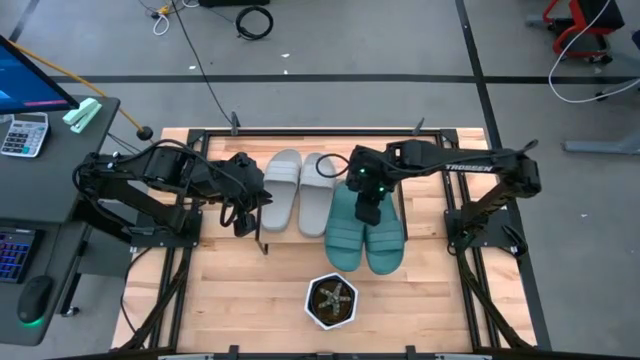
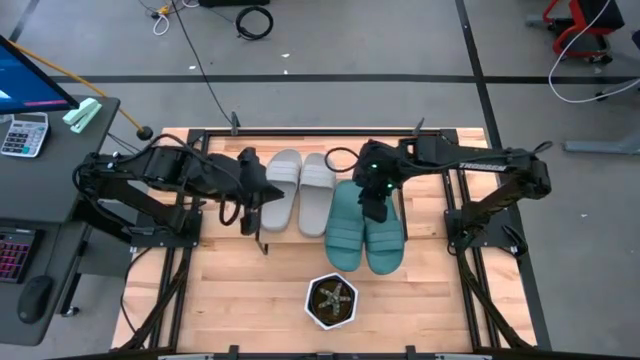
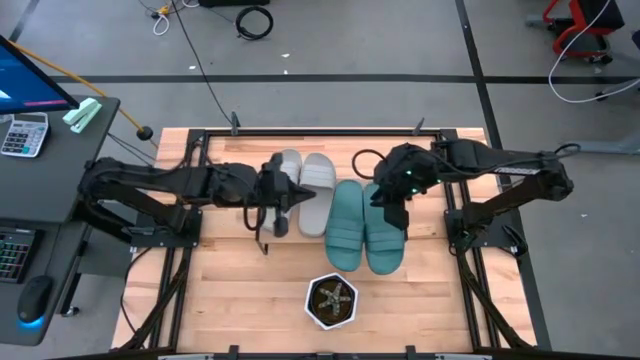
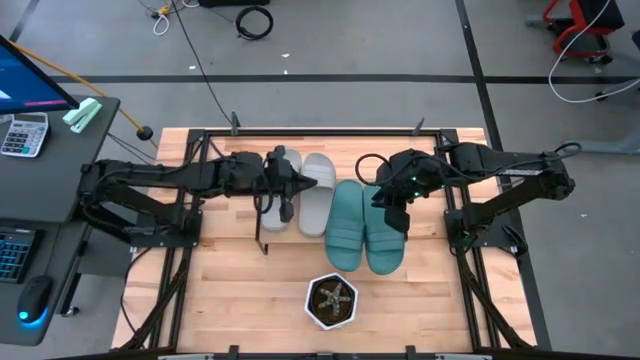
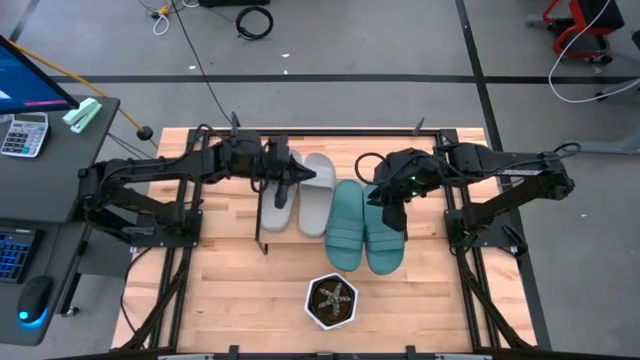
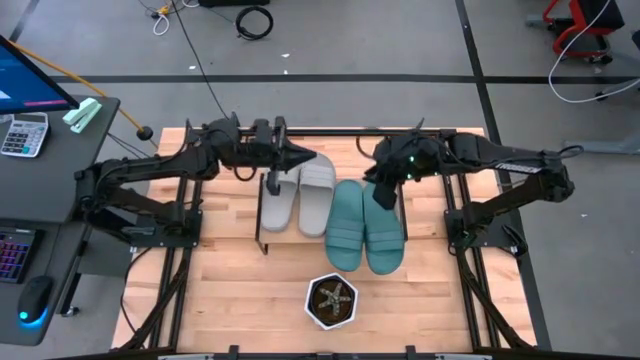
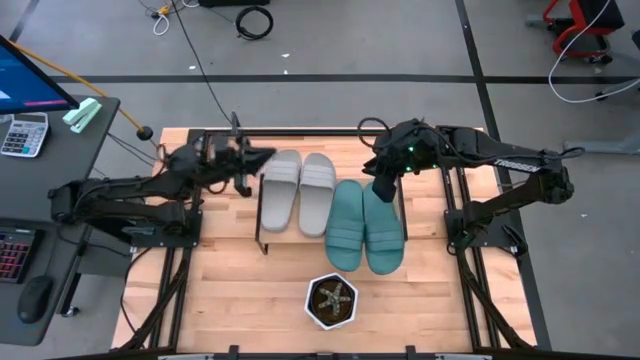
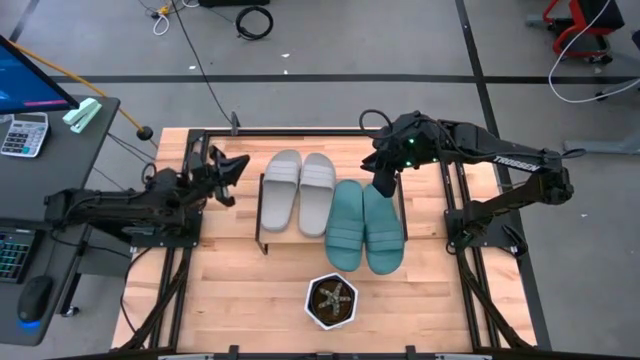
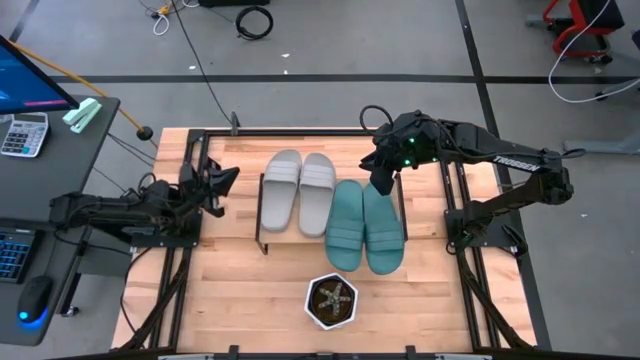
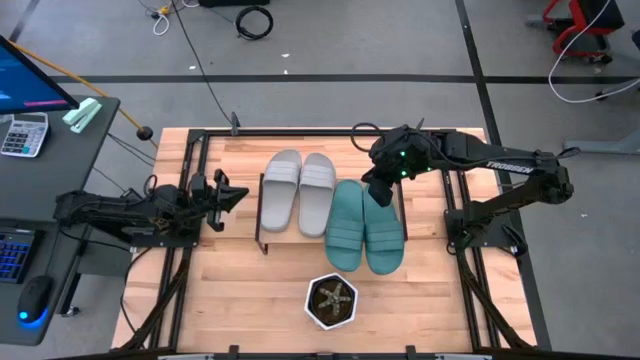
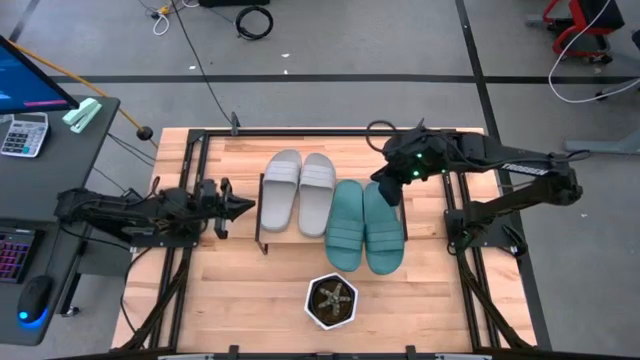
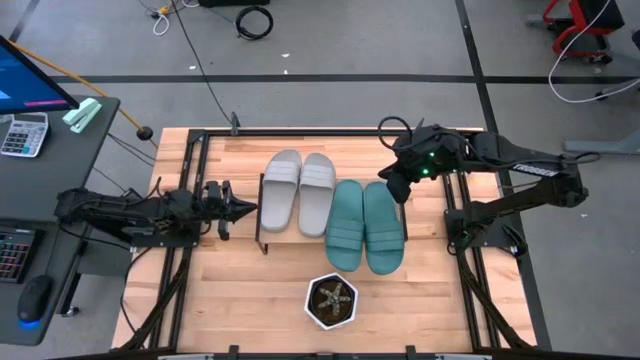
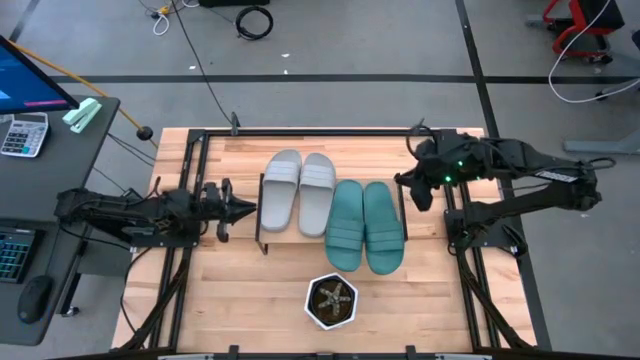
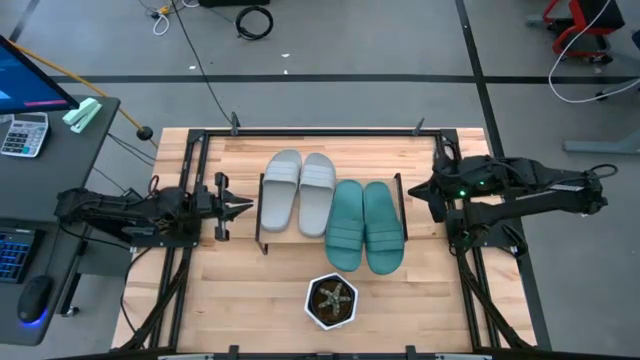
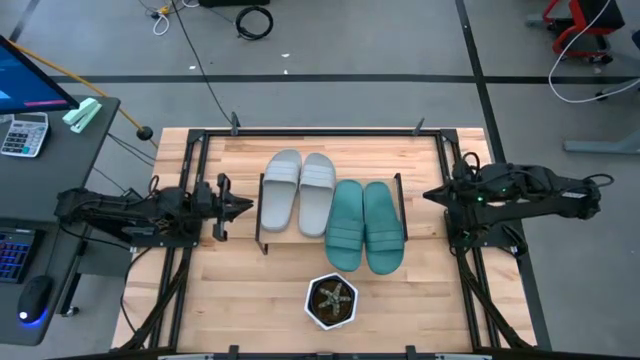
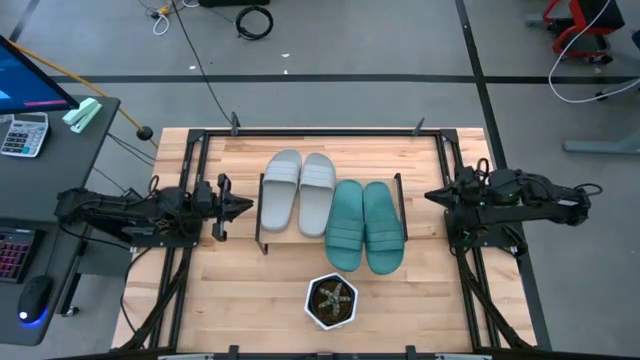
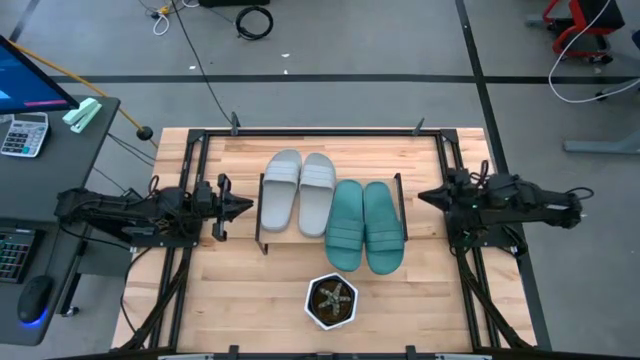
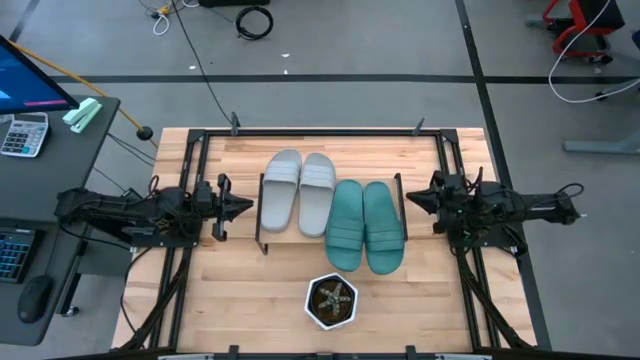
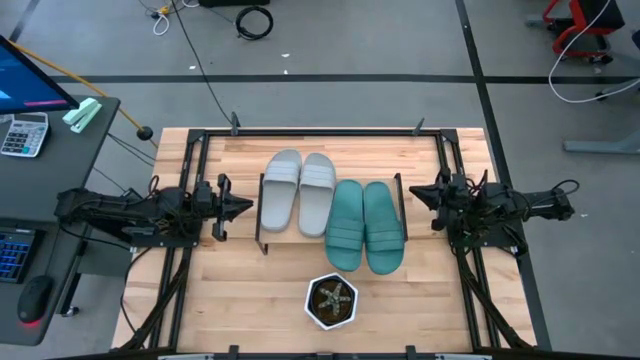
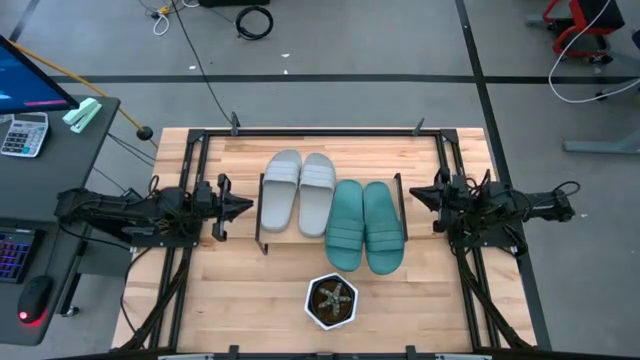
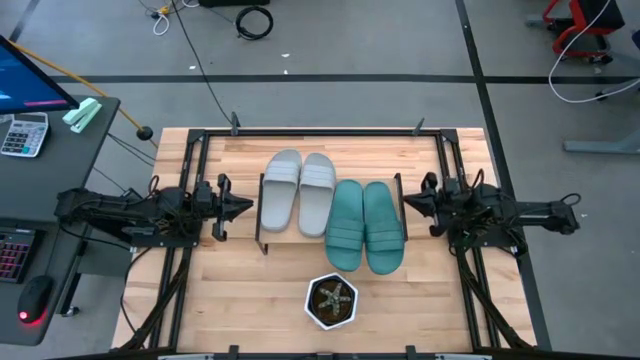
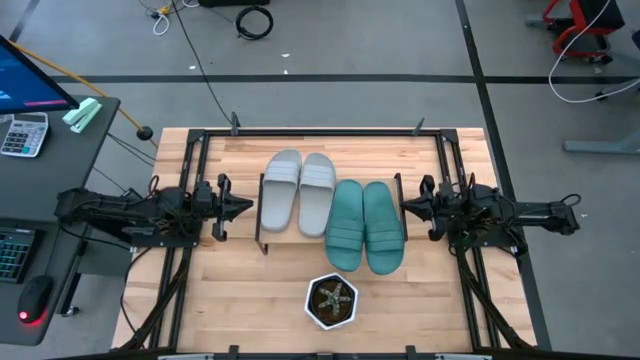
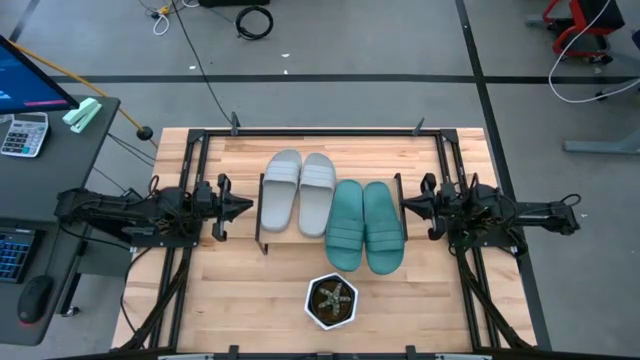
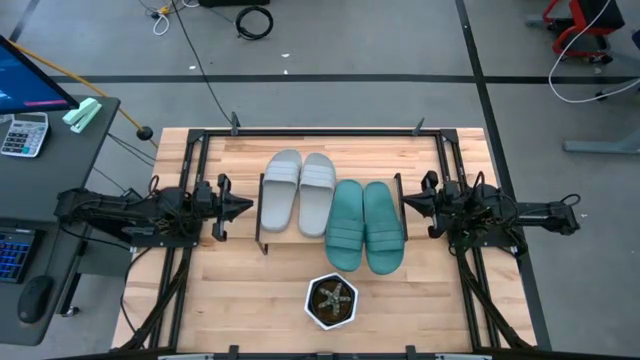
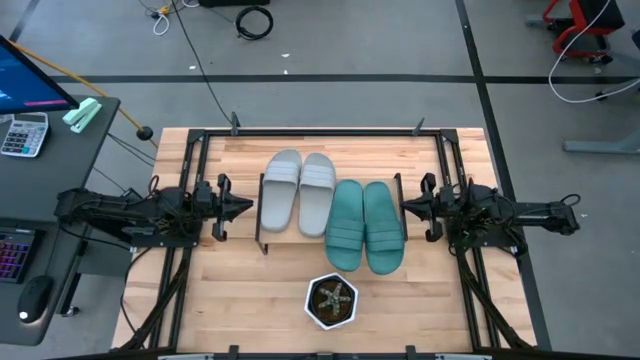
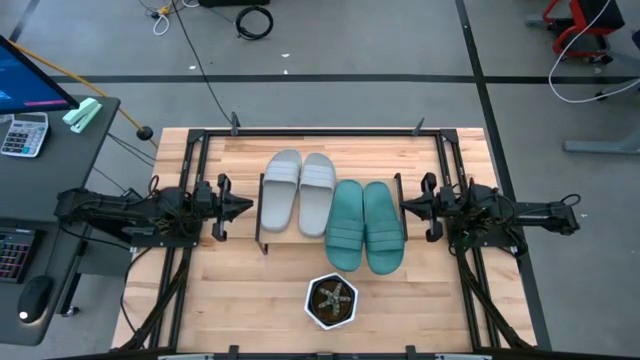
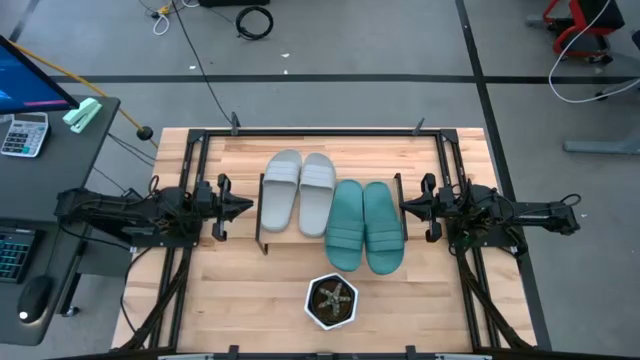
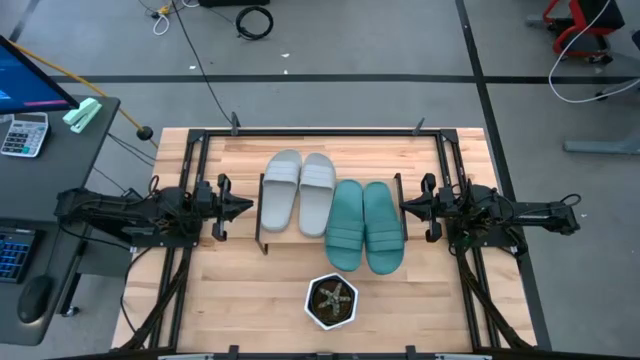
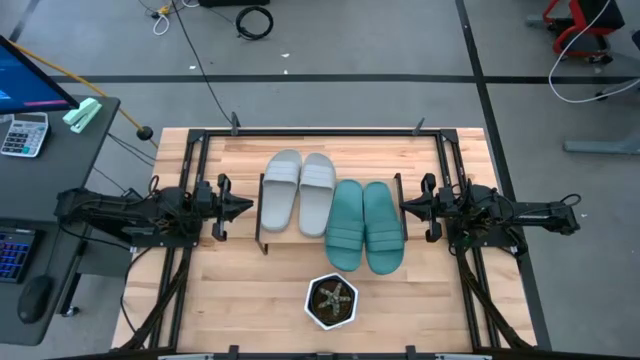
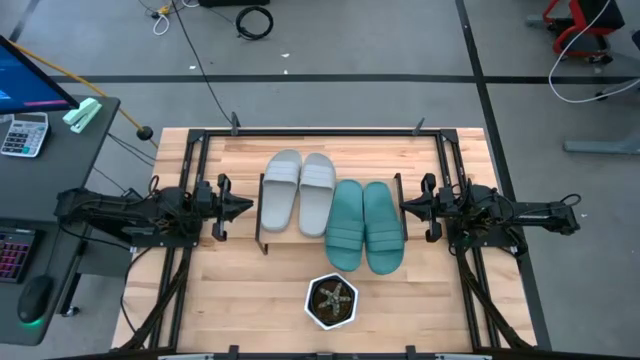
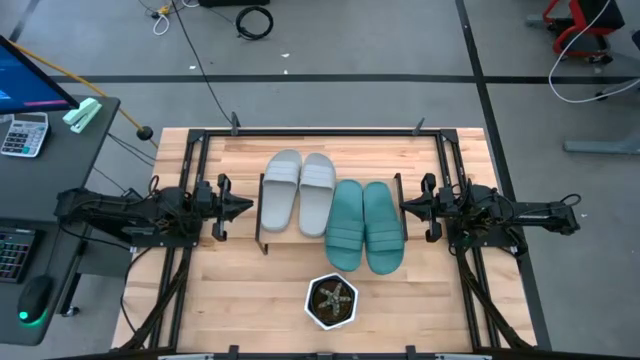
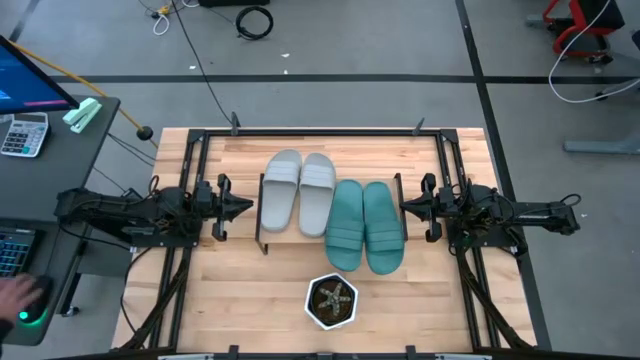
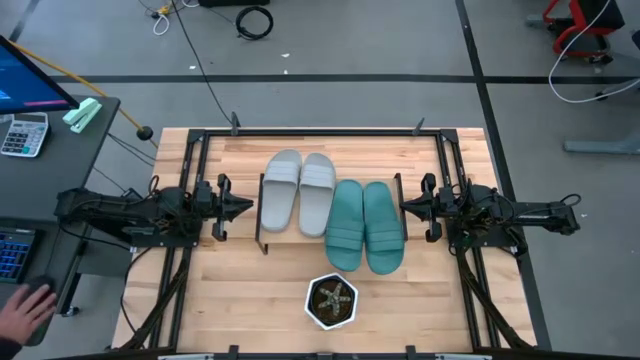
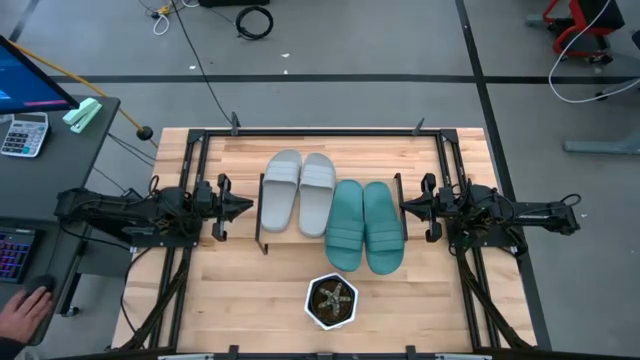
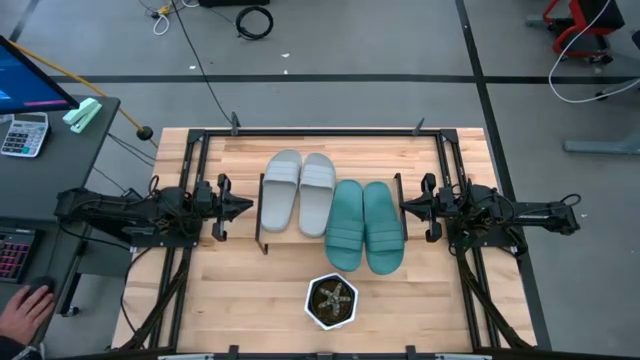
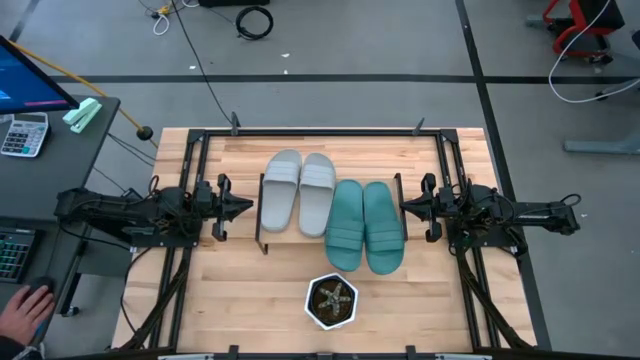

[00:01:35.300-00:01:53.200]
Task: Pick and place slides into the shelf
Return to Home Position

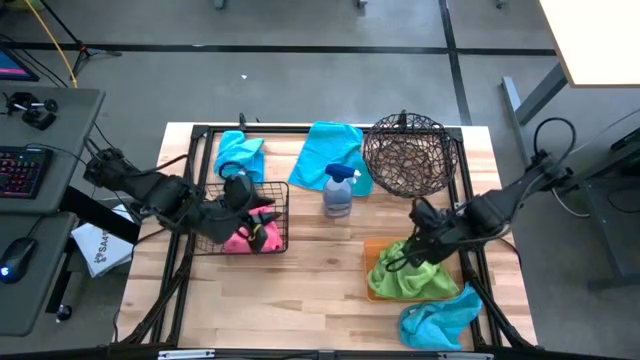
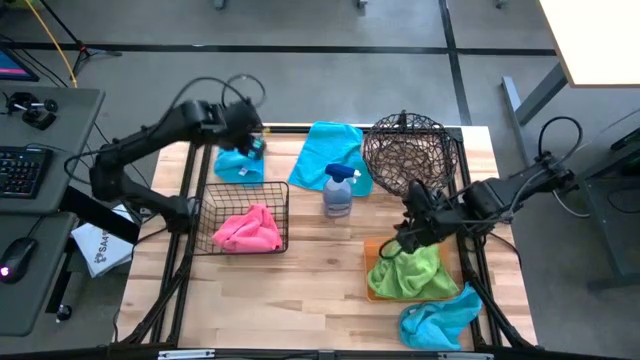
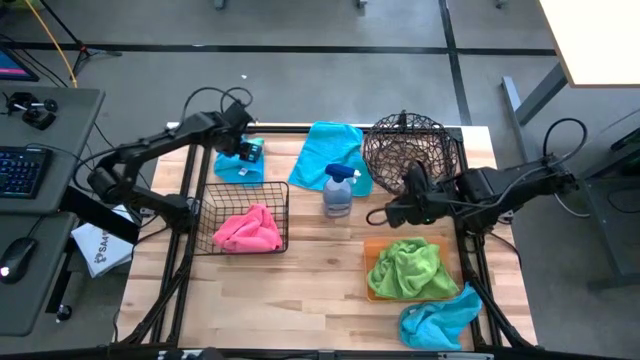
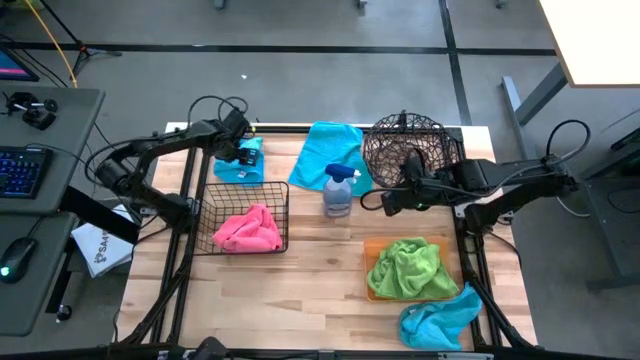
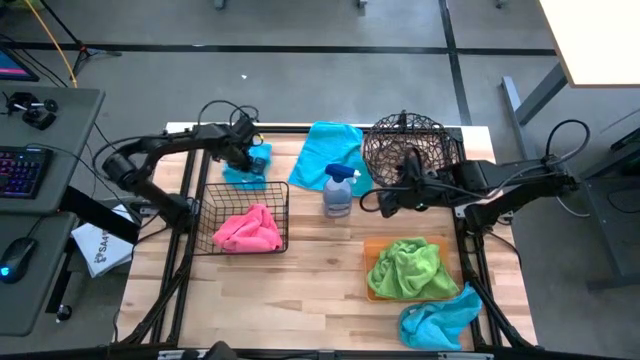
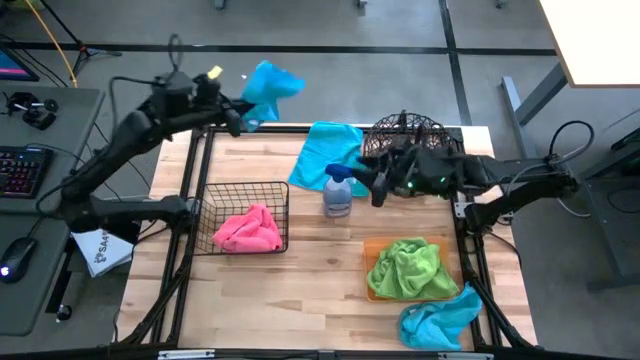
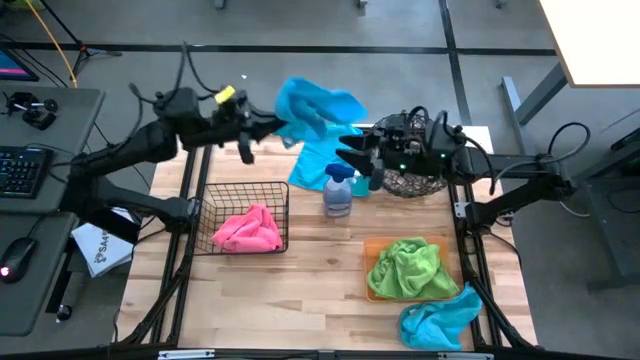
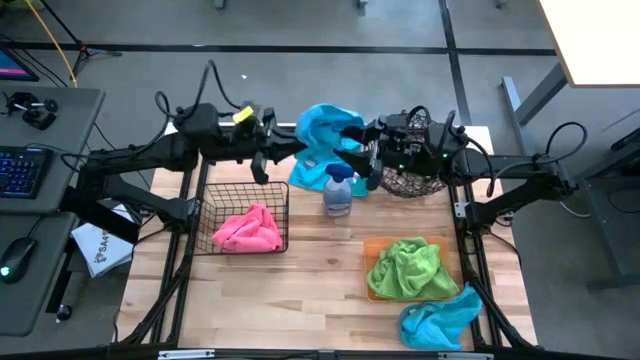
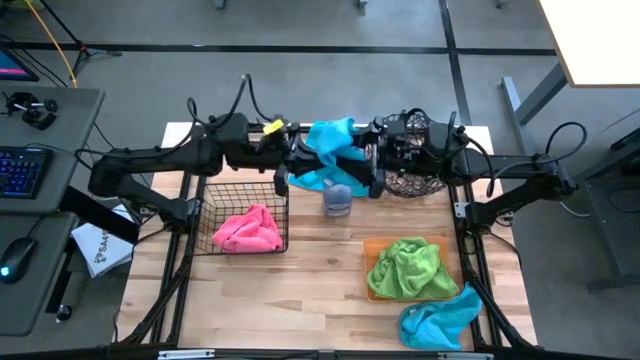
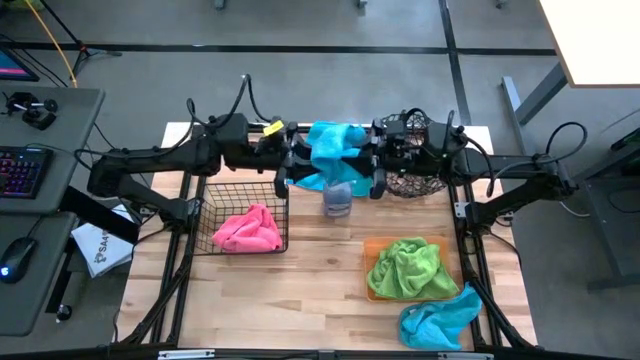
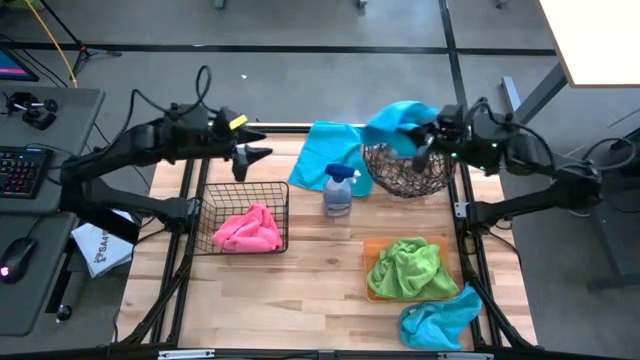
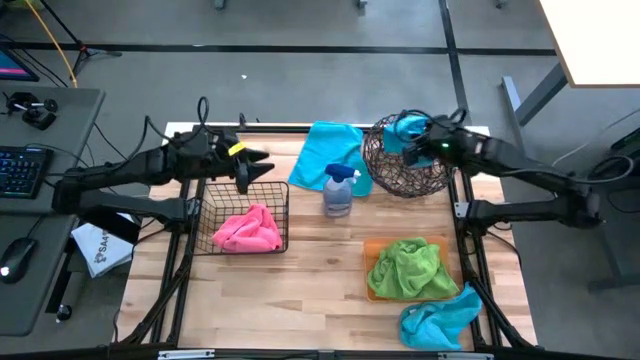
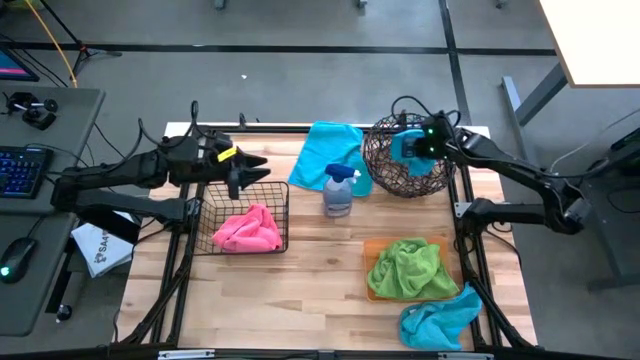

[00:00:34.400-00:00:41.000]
Task: Sort microfiber towel by color & place in baskets
Put the top left blue microfiber cloth into the right wire basket
